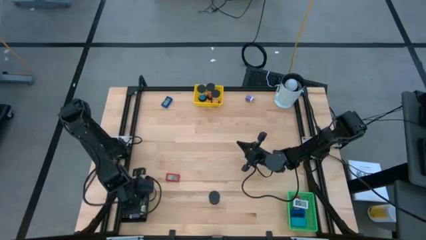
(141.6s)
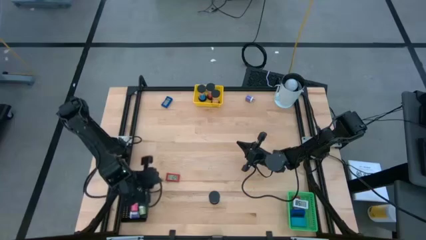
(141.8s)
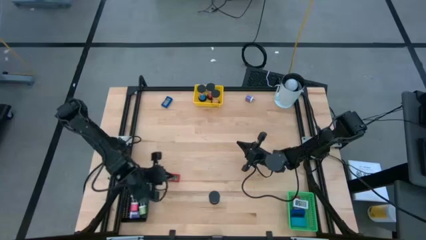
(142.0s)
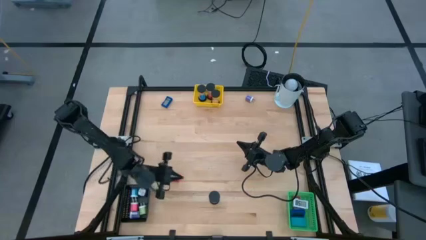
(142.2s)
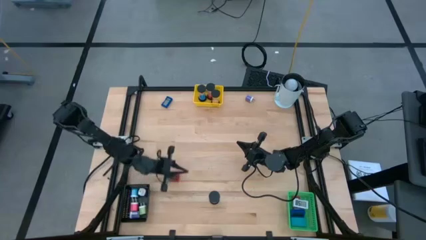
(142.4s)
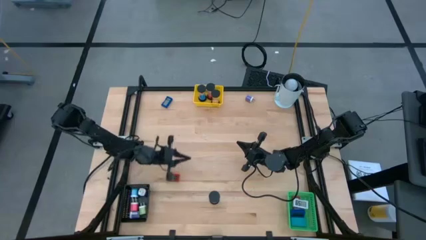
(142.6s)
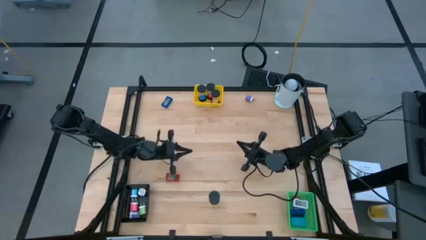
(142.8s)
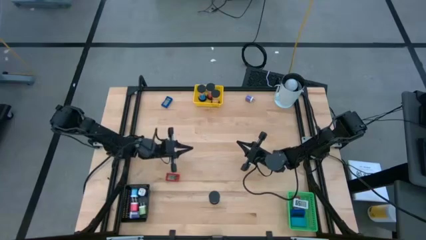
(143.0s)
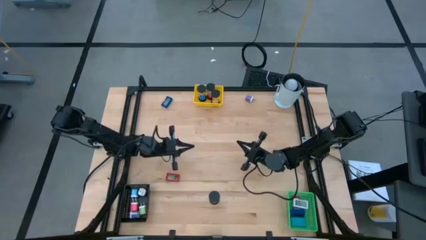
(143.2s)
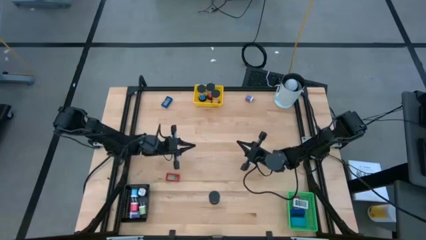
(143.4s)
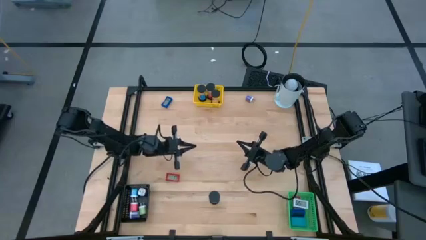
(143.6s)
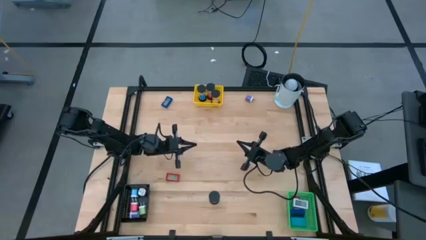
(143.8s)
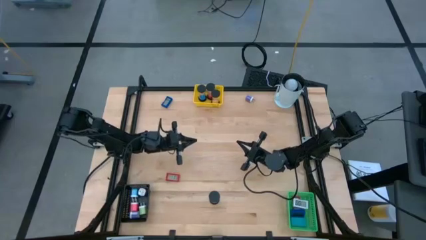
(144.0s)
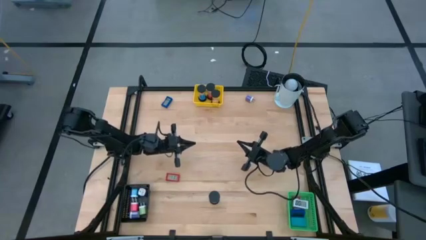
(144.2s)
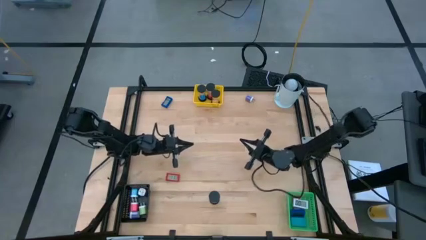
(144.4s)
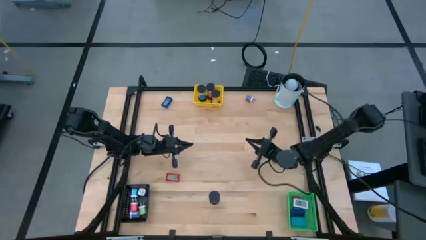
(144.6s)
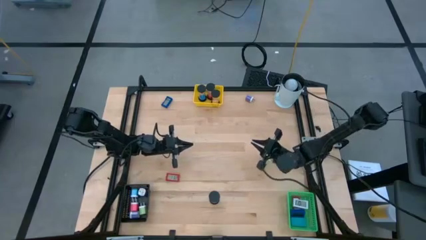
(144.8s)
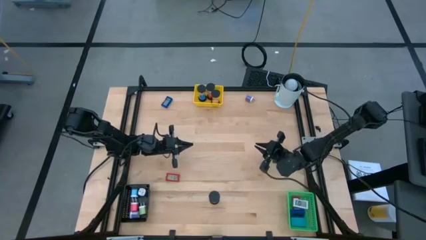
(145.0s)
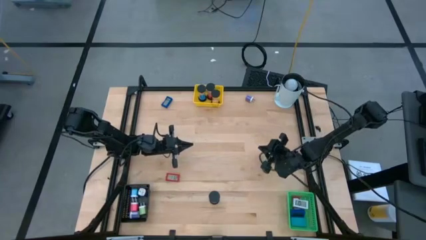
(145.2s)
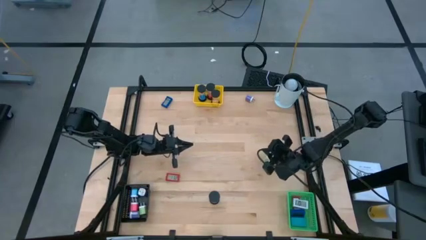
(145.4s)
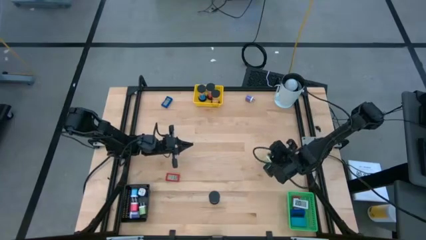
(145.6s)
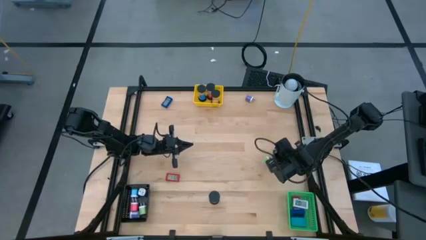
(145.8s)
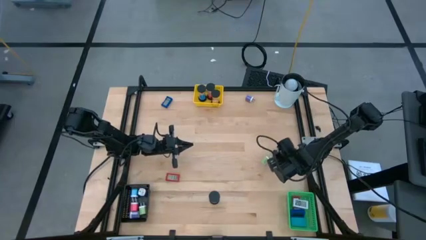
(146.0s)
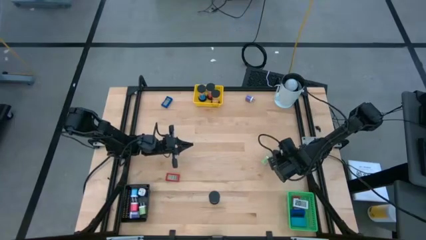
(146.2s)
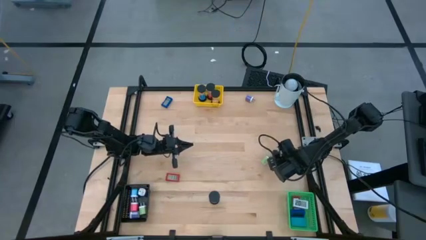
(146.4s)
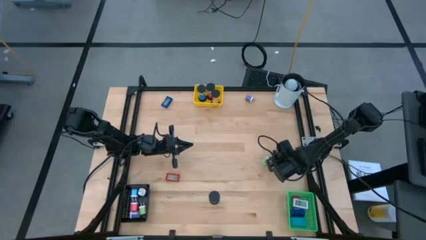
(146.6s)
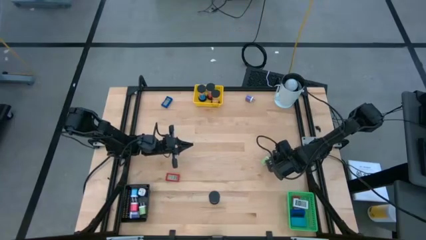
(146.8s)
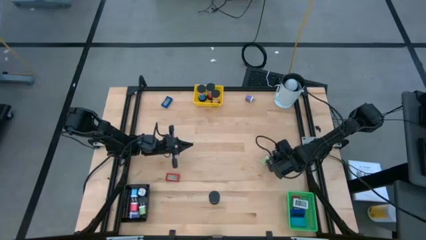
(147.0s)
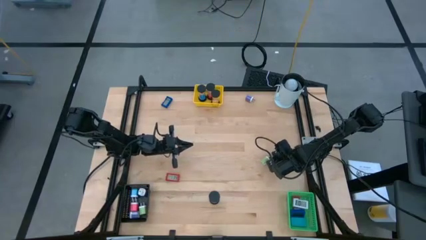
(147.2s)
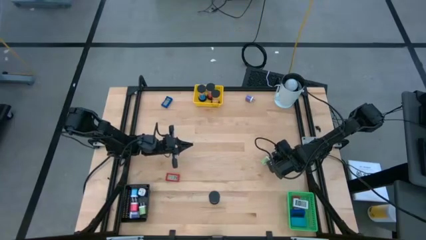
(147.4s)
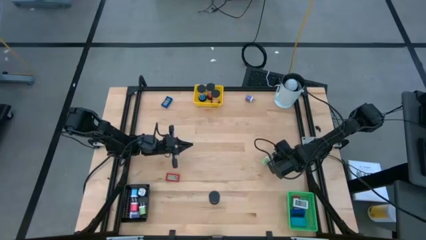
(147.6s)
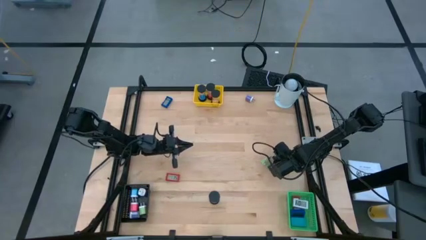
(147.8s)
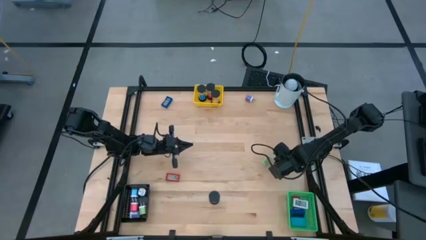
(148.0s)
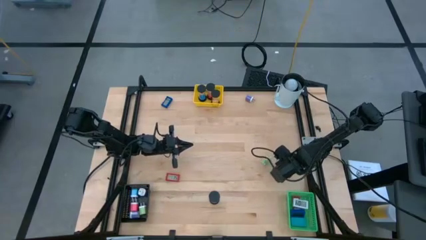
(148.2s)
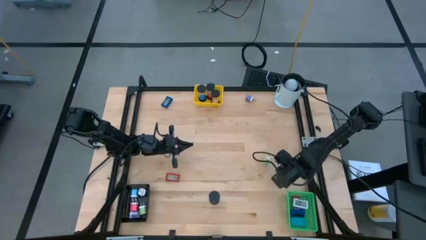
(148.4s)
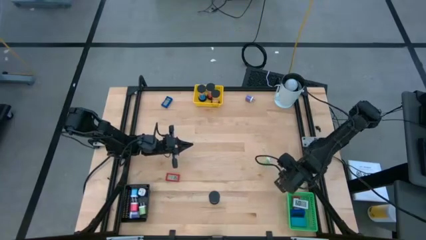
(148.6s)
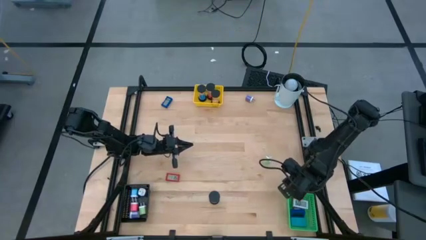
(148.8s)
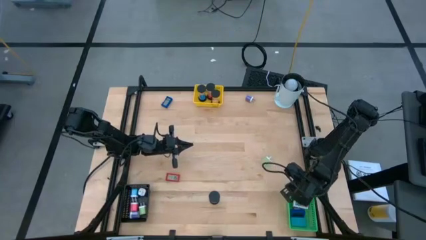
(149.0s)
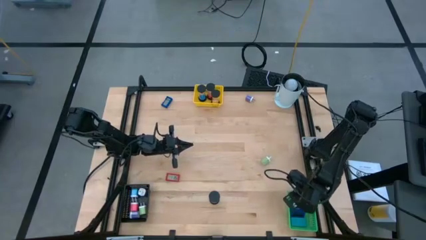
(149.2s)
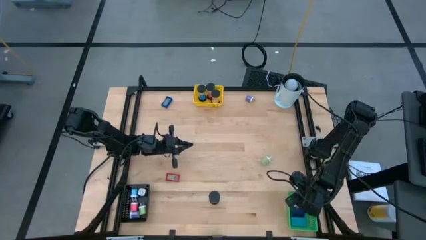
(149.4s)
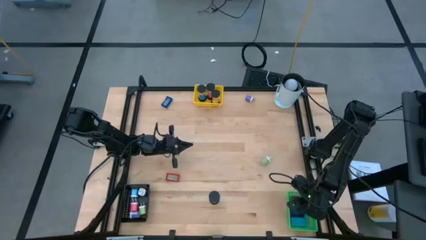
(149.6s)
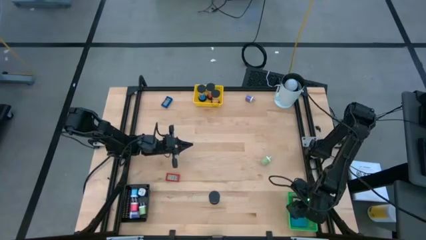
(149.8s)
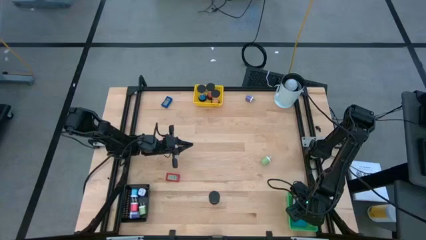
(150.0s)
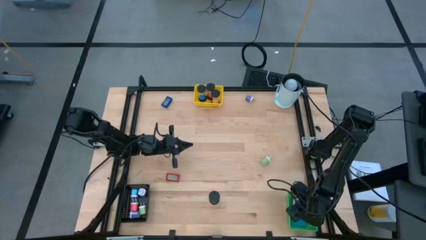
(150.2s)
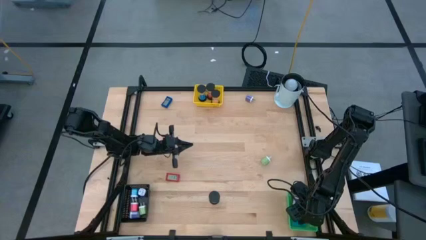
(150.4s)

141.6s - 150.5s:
Task: Pick & Place Office items
Put the black digital timer into the green bin

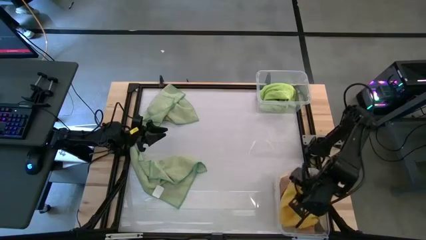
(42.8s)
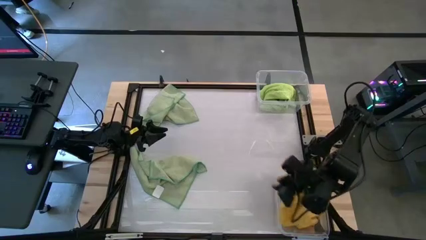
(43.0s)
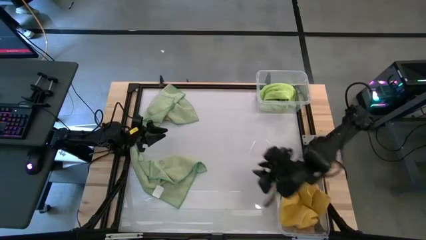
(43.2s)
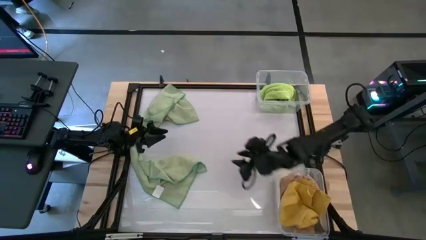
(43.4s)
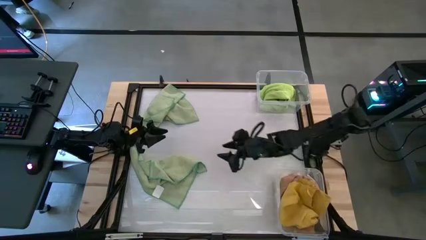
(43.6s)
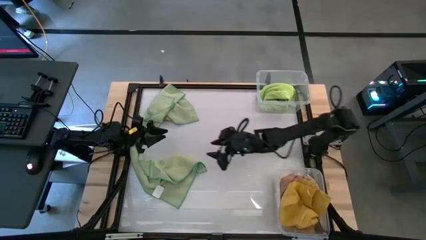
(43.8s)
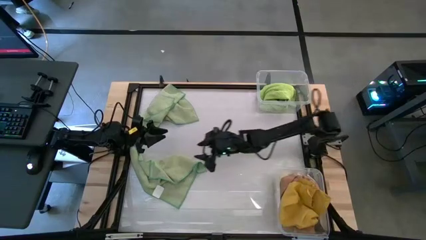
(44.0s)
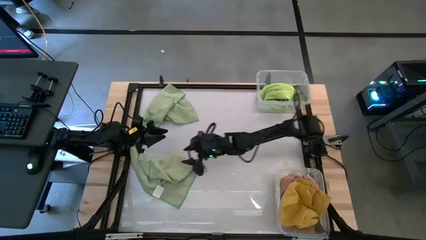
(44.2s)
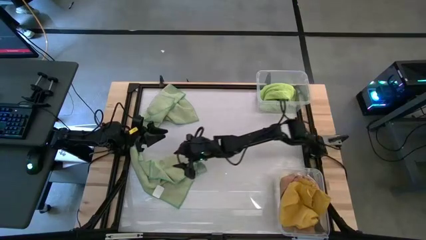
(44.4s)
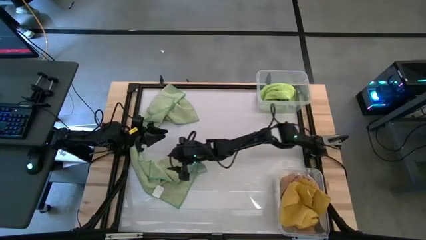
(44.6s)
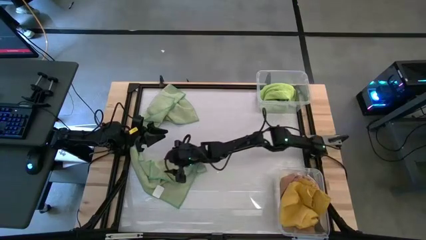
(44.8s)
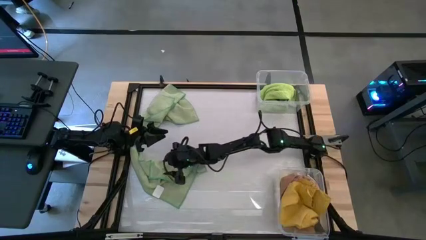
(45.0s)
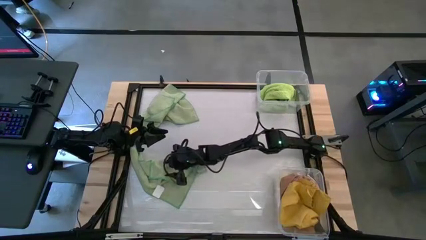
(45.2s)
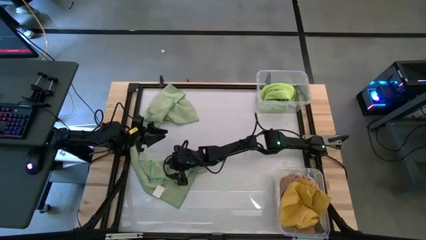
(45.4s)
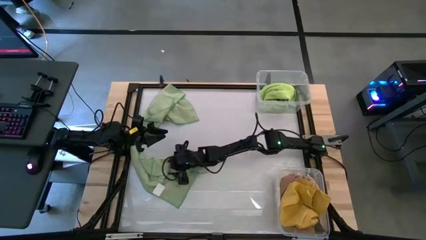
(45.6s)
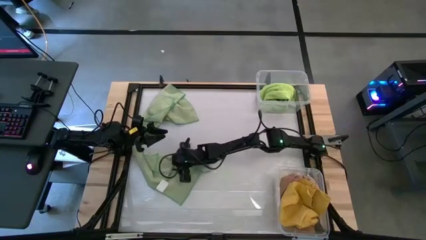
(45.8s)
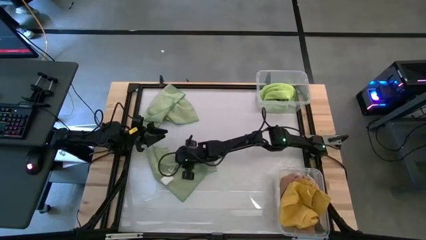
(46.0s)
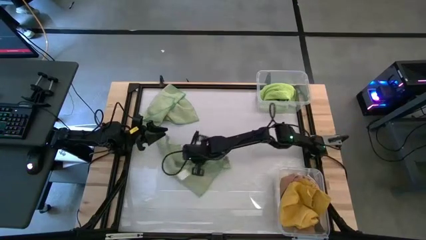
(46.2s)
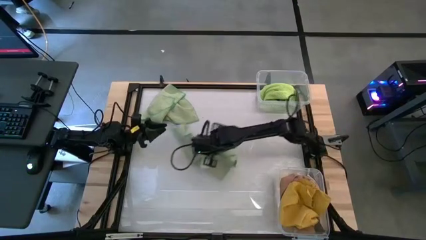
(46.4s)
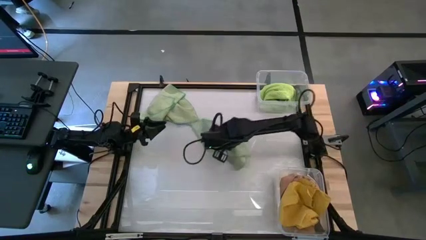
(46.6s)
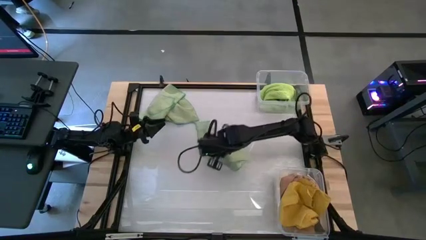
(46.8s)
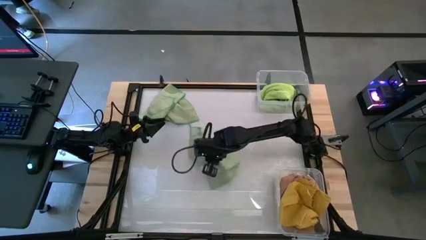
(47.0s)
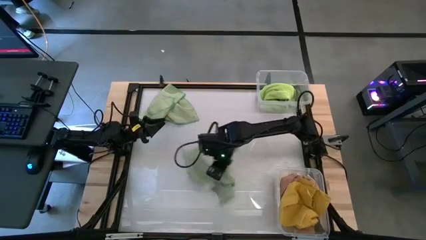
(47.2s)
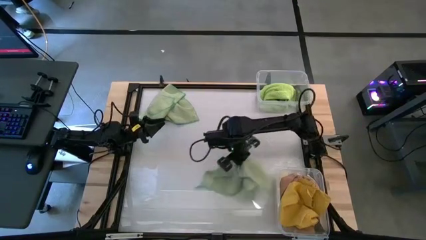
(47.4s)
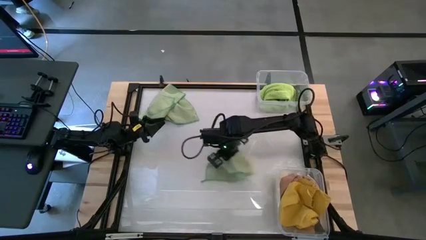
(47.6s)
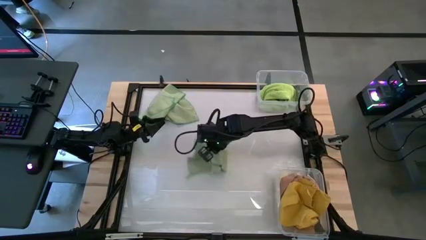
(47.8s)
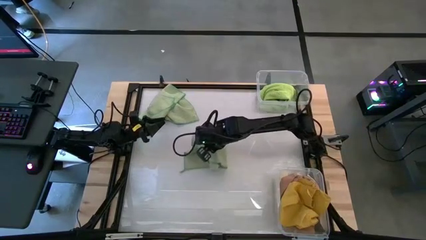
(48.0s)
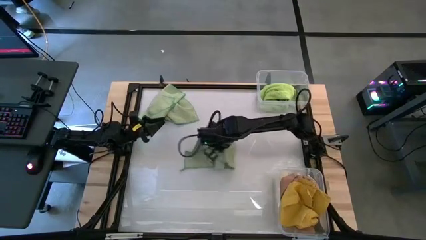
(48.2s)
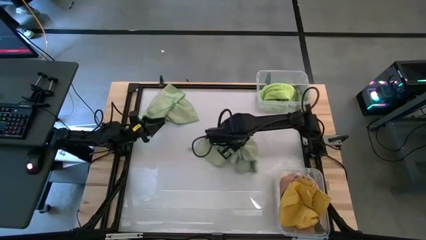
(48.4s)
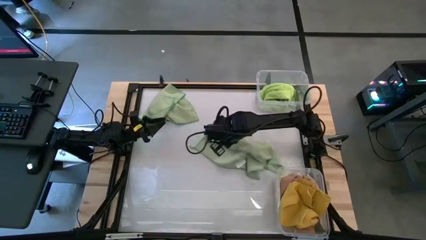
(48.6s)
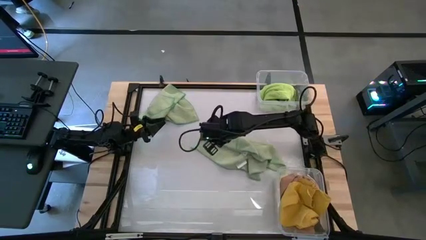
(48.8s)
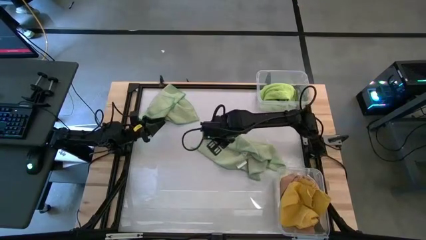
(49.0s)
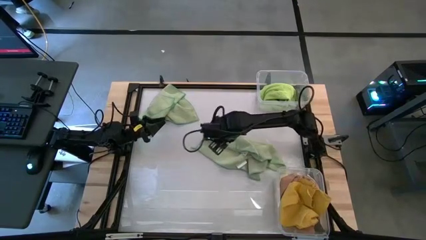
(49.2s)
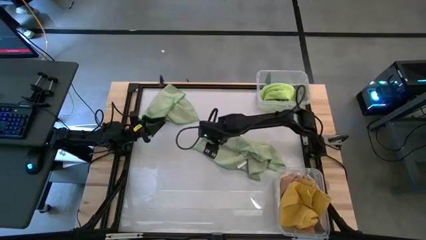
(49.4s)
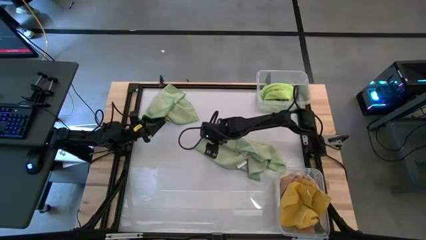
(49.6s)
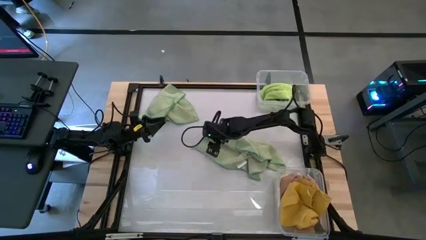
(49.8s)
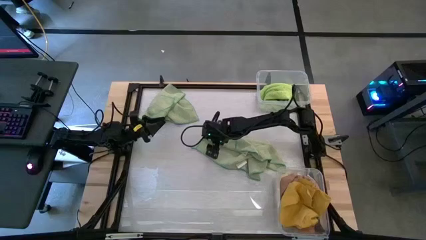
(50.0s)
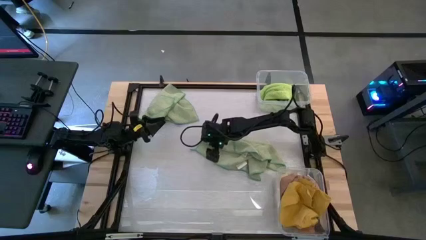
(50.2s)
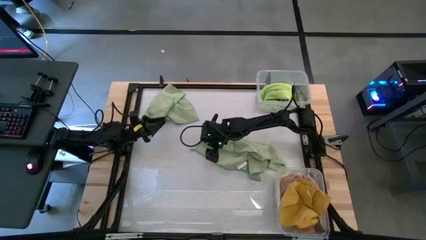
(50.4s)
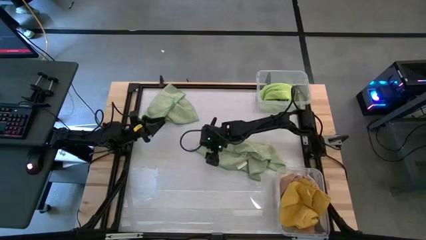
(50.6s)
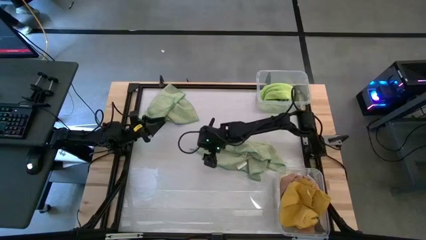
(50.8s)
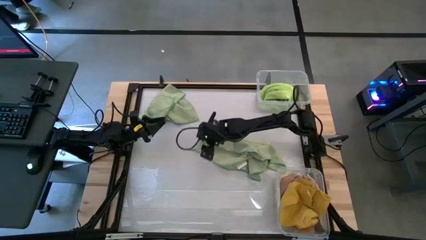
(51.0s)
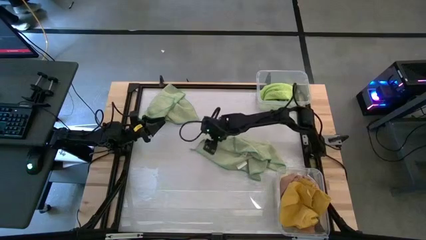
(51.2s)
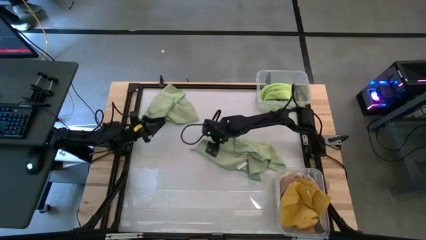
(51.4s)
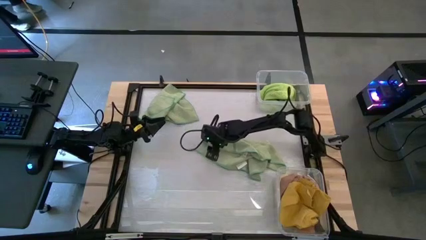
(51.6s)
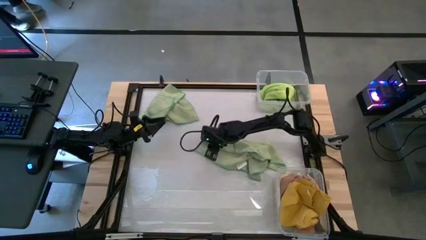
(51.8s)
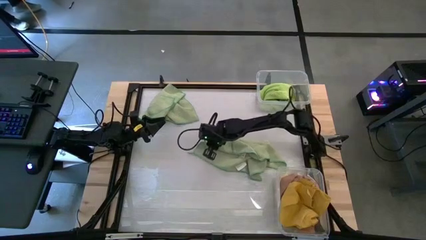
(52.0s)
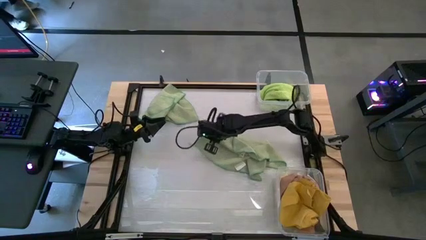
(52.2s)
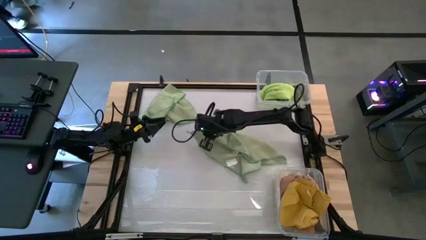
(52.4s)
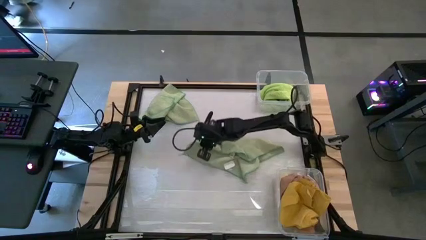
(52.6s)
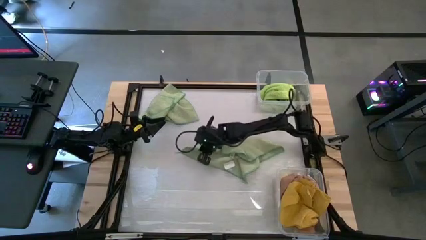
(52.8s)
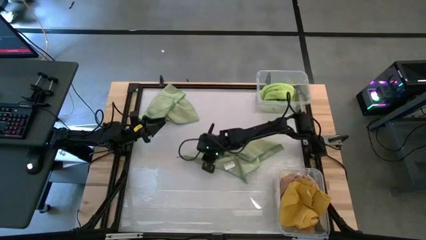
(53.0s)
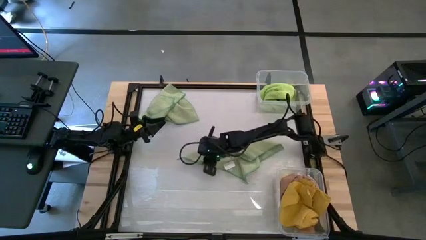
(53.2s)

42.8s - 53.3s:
Task: Sort towels by color in basket
Put the bottom light green towel into the top transparent bin
